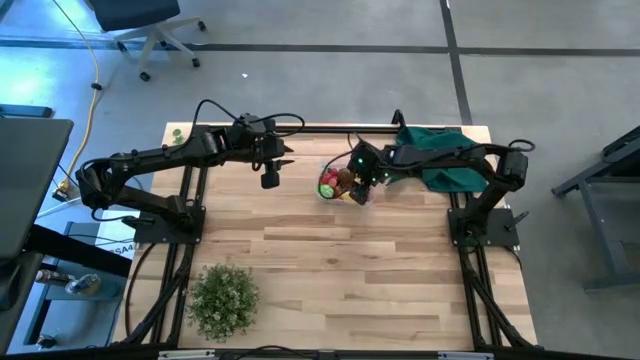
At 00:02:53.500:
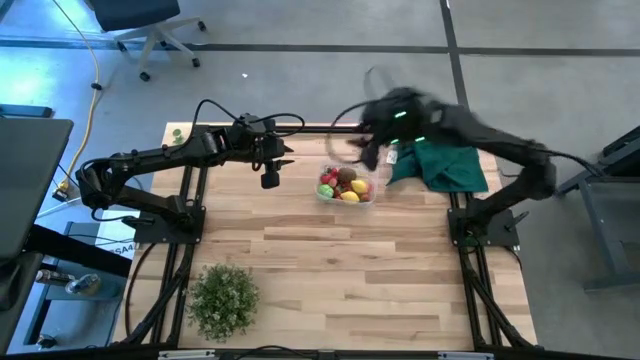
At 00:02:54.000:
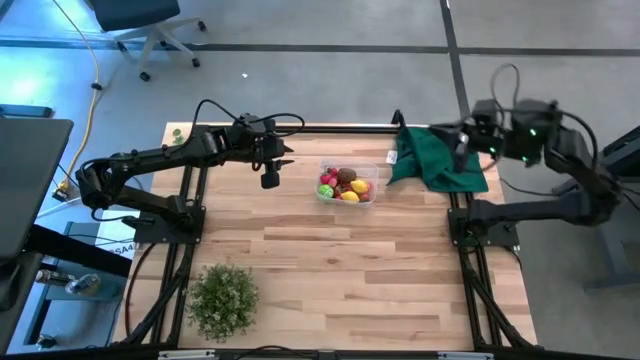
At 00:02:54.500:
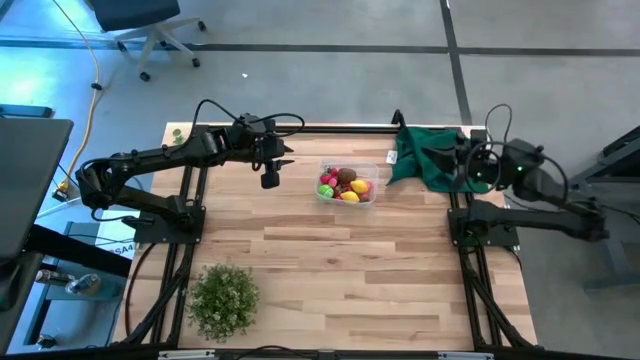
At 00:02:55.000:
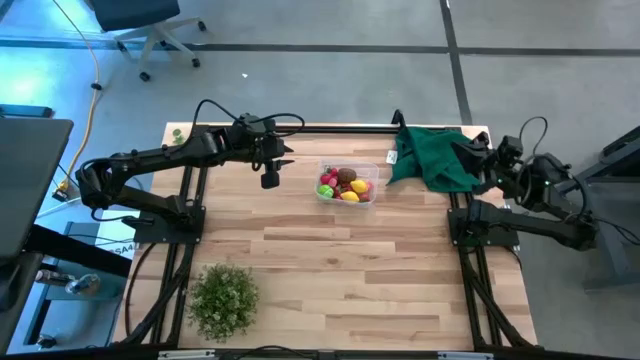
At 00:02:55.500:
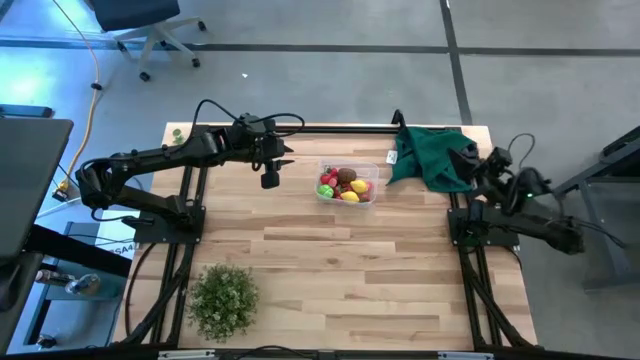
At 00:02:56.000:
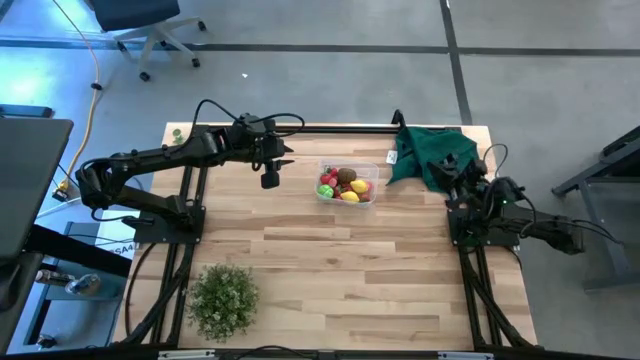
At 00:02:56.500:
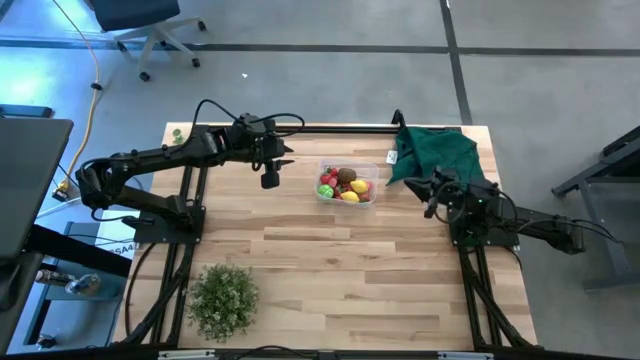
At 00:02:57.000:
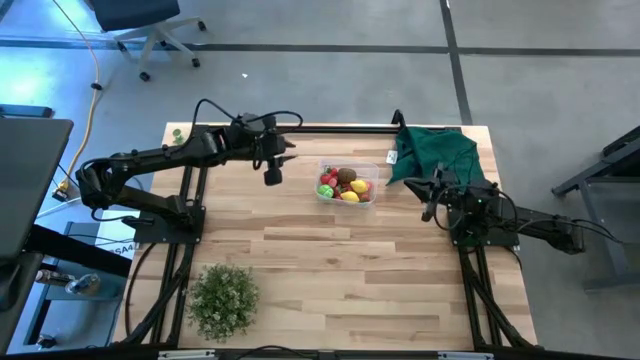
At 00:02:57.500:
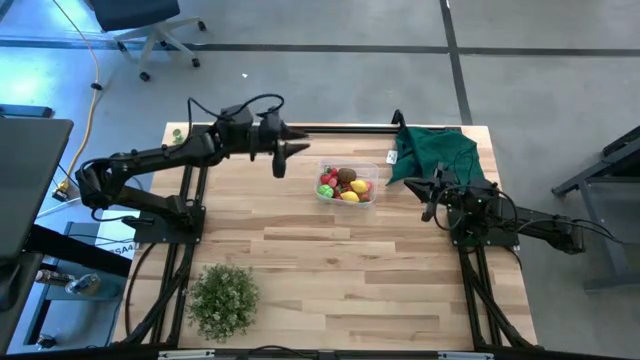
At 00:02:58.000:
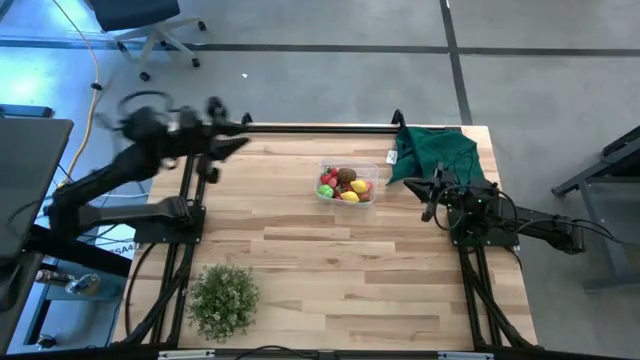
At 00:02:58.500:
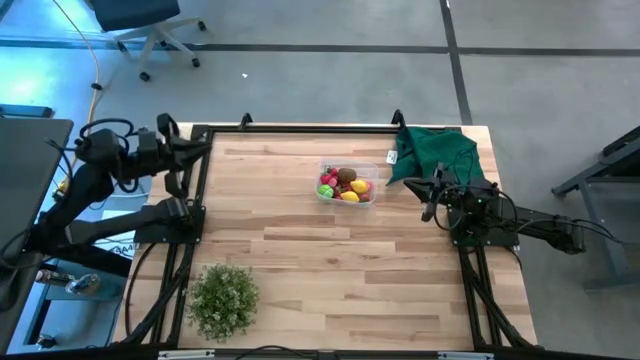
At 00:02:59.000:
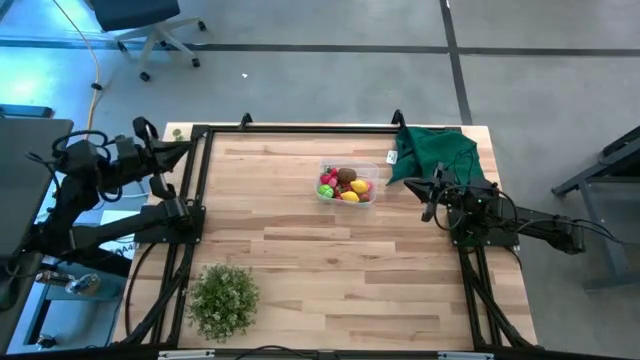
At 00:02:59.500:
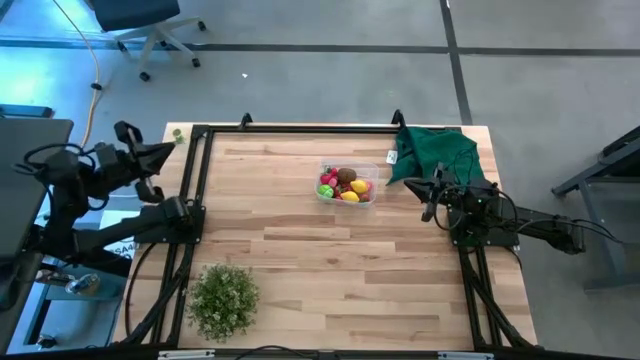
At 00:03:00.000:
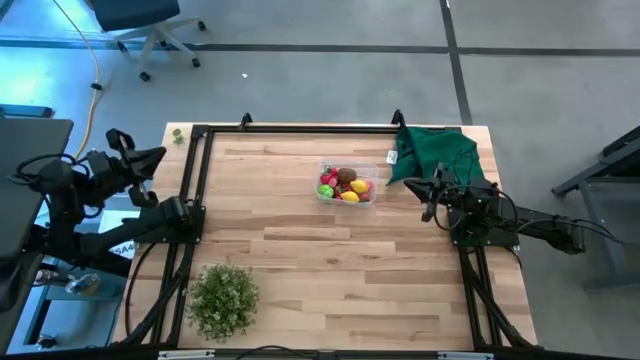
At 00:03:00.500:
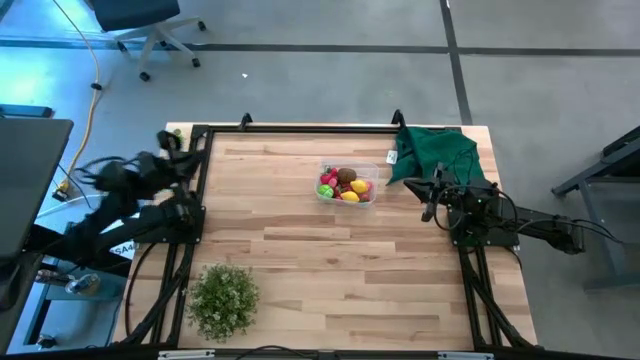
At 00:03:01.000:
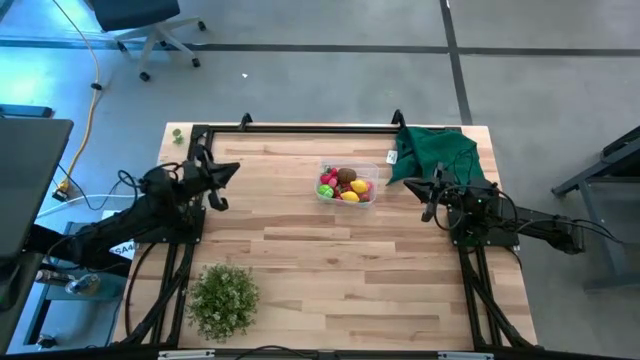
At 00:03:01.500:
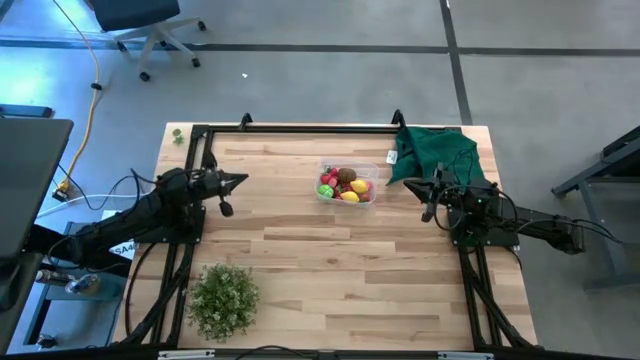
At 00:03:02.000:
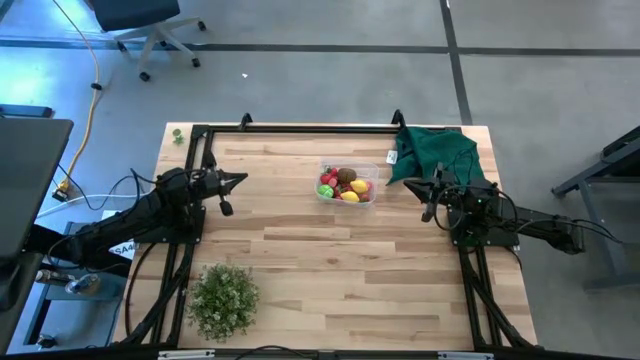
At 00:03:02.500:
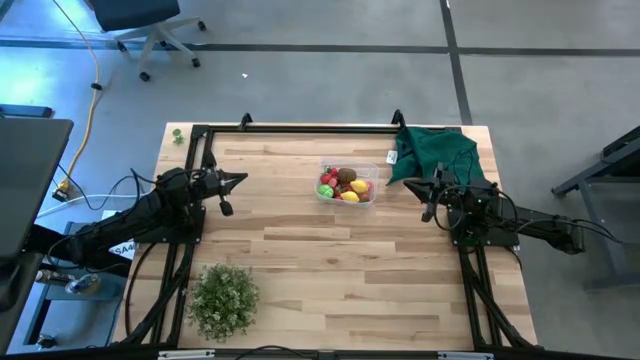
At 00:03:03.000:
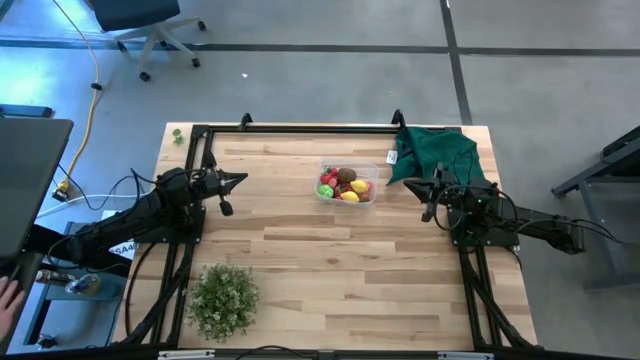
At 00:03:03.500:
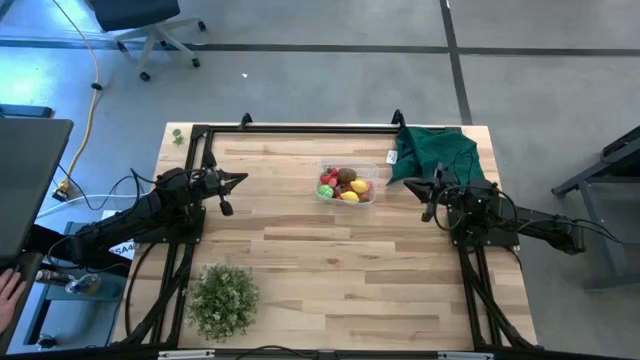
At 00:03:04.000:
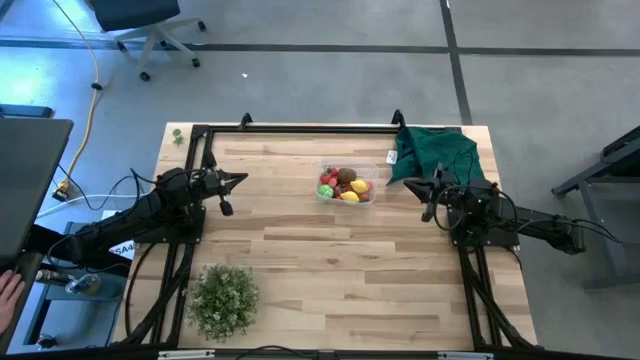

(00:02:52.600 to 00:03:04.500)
Task: Pick and placing Produce into tupperware
Return to Home Position

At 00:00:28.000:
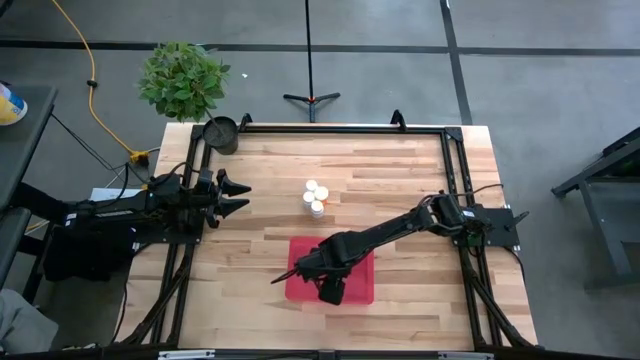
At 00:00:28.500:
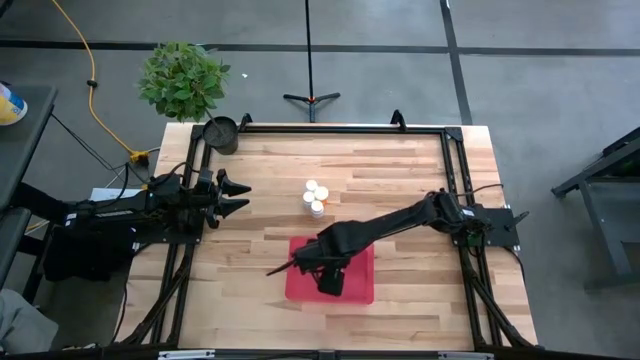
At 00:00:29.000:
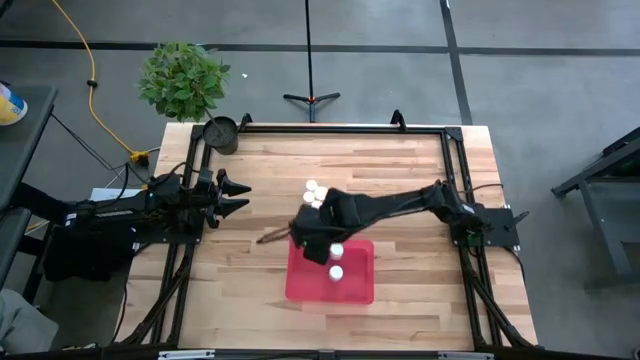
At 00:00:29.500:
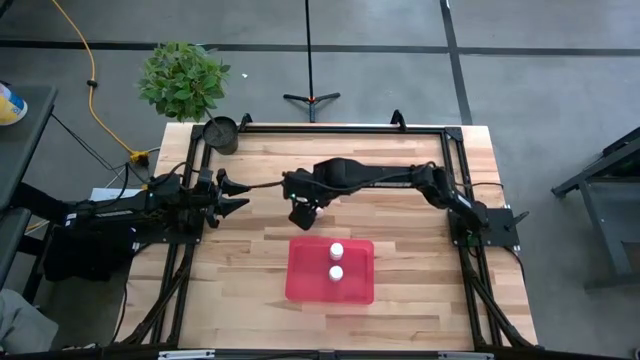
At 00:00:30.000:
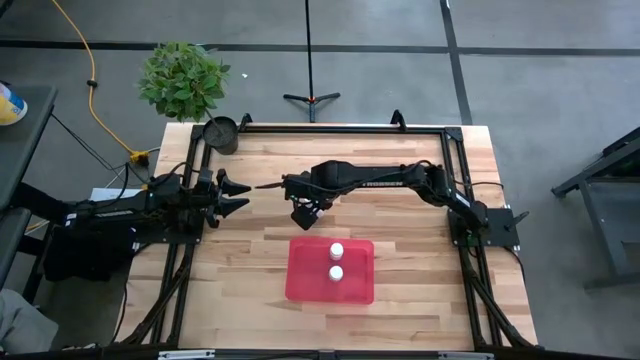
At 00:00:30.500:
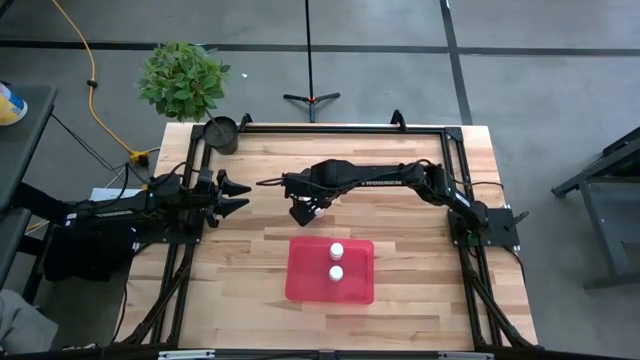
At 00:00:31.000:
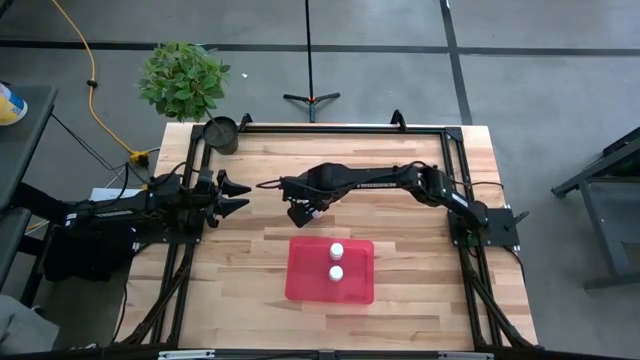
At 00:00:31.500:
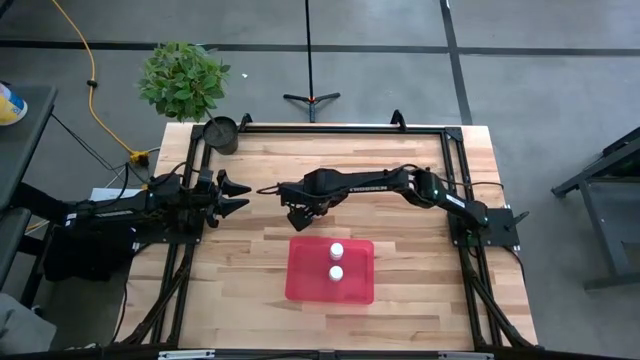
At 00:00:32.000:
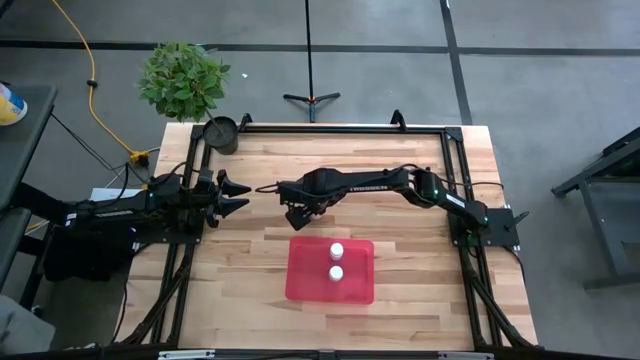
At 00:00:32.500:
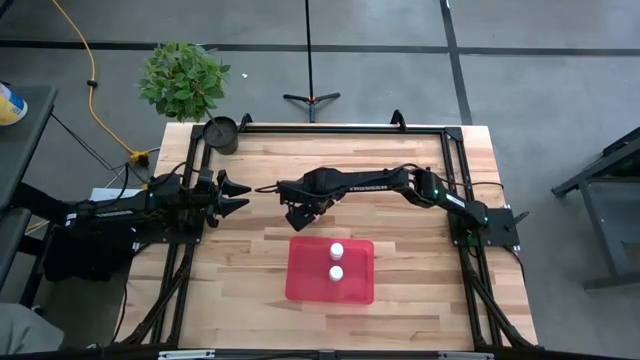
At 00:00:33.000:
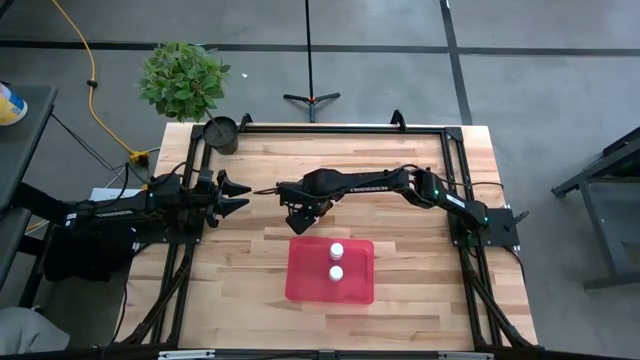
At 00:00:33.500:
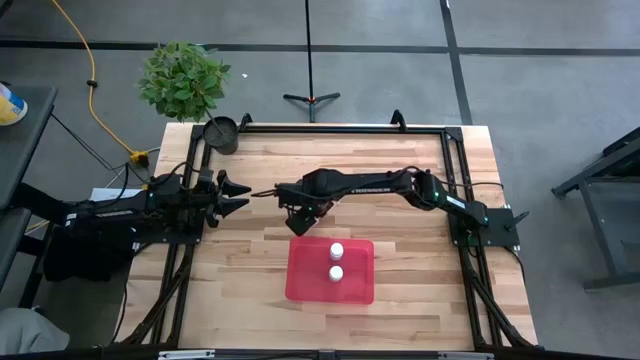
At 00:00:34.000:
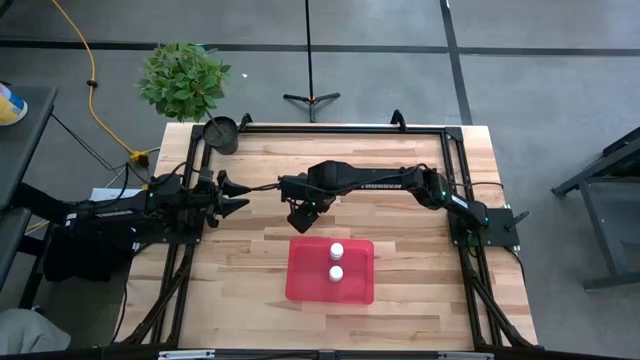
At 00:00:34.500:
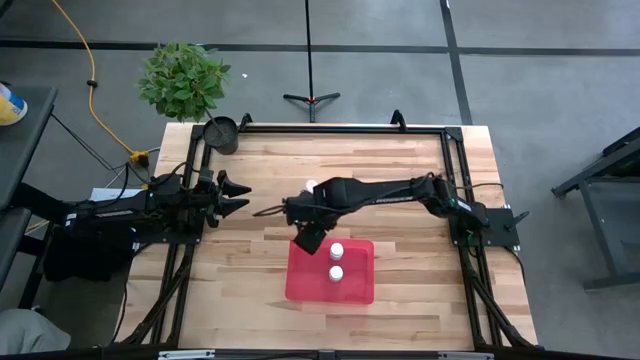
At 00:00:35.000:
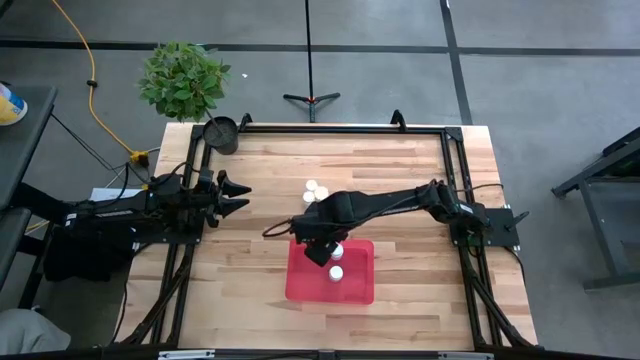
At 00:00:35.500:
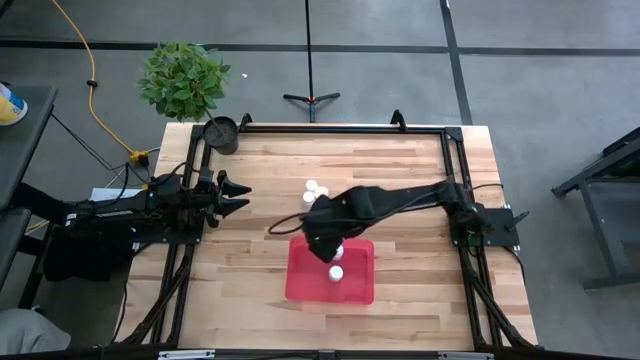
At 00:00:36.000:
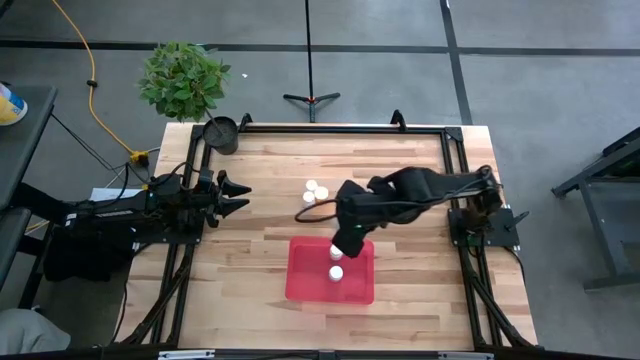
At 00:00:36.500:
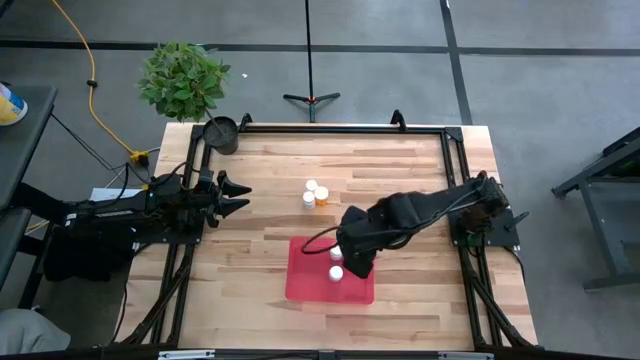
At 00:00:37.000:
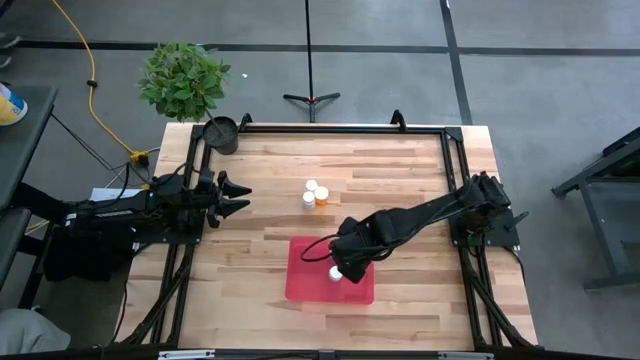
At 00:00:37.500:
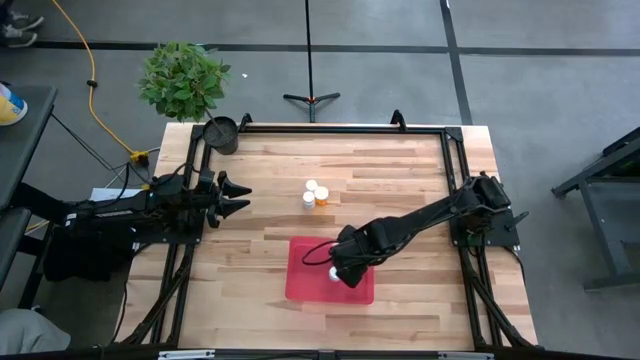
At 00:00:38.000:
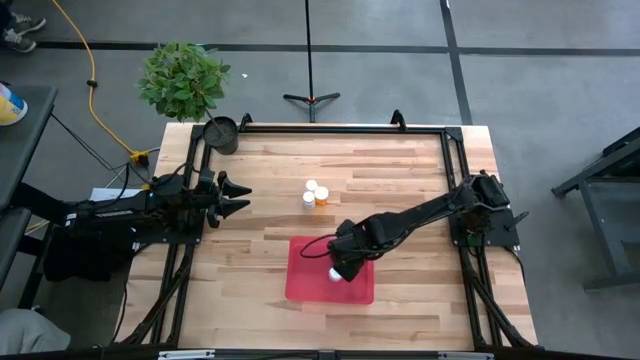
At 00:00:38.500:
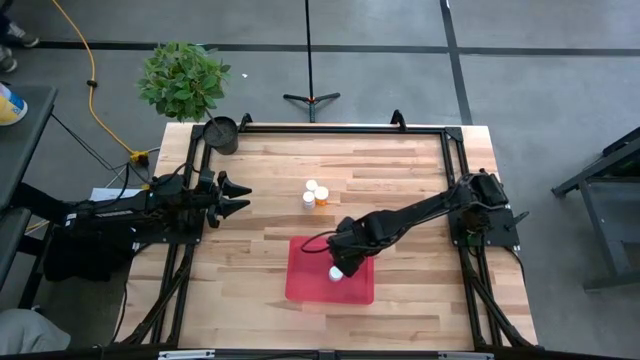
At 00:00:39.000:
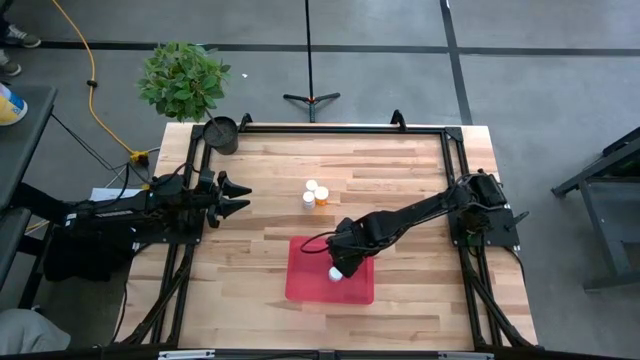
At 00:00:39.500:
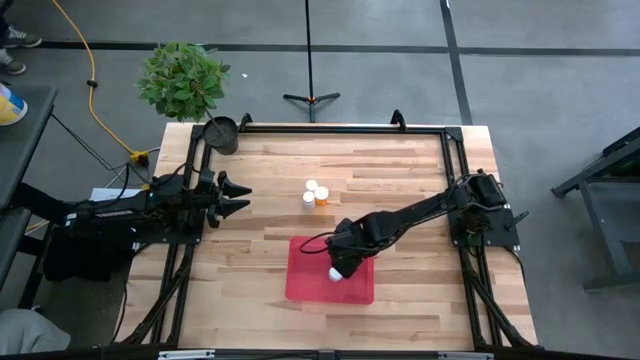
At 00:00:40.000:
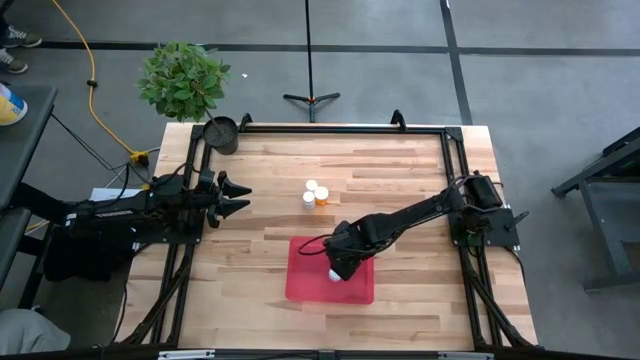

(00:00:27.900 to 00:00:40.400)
Task: Pick and place pill bottles into a basket
Put the bottom white pill bottle into the bin
